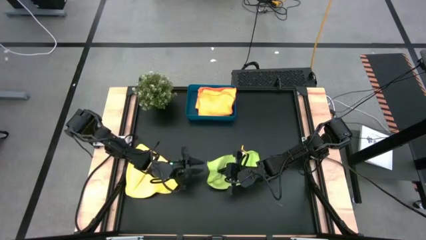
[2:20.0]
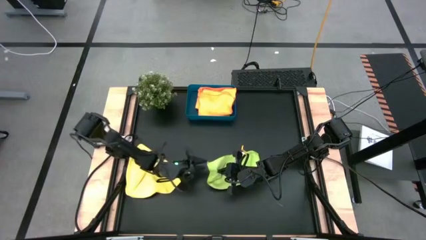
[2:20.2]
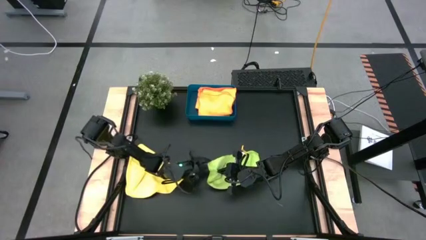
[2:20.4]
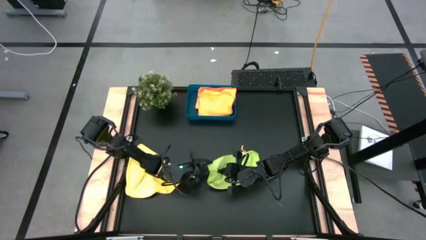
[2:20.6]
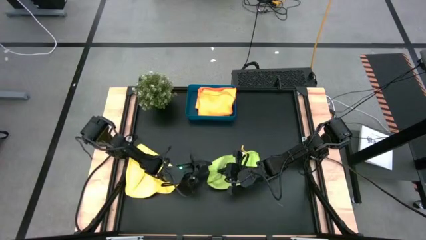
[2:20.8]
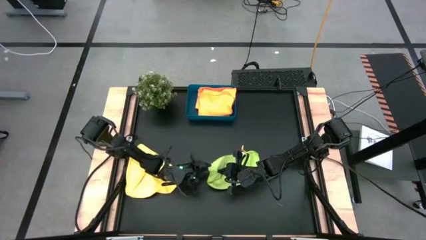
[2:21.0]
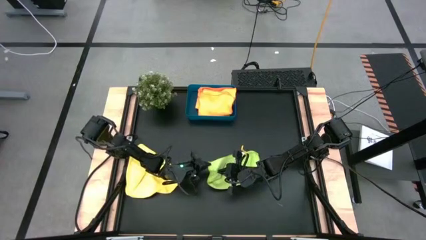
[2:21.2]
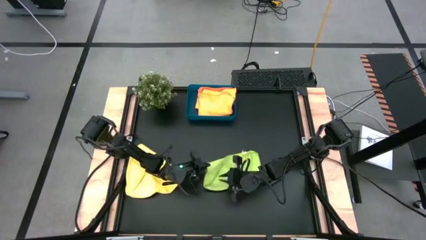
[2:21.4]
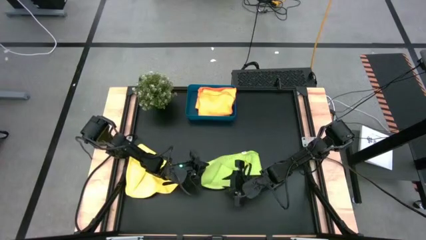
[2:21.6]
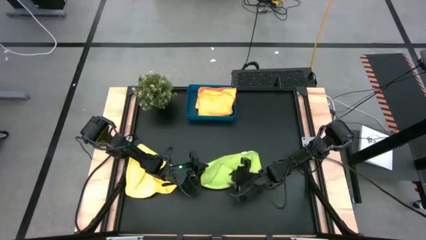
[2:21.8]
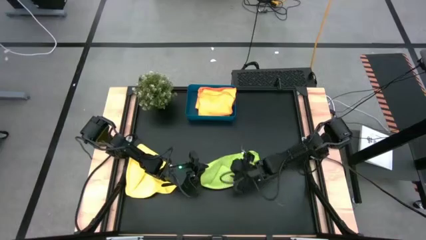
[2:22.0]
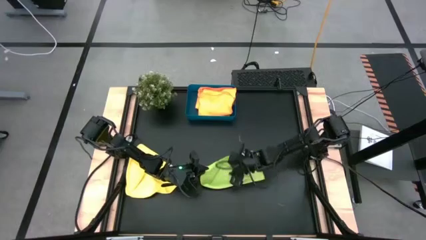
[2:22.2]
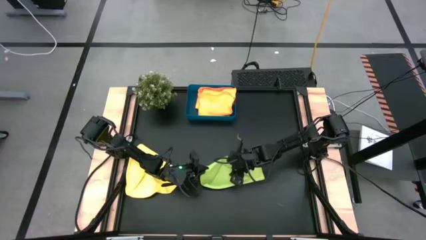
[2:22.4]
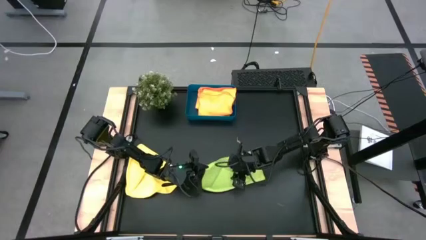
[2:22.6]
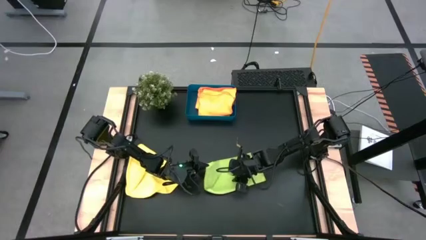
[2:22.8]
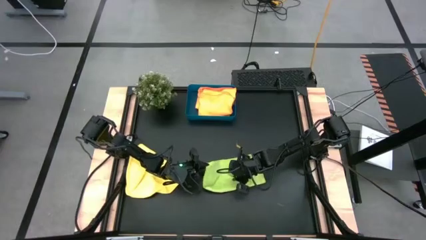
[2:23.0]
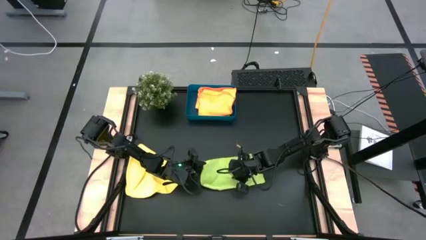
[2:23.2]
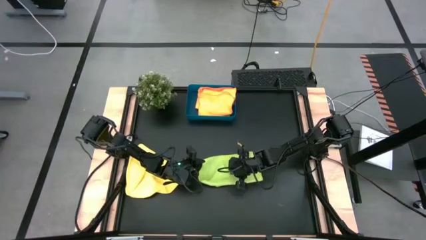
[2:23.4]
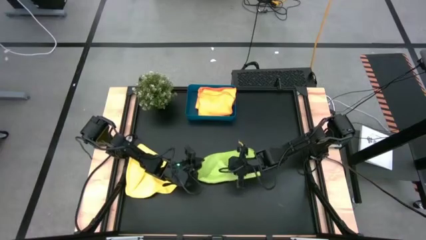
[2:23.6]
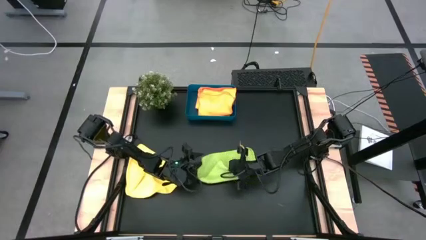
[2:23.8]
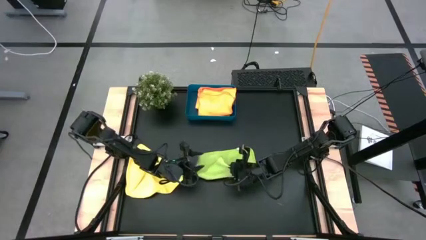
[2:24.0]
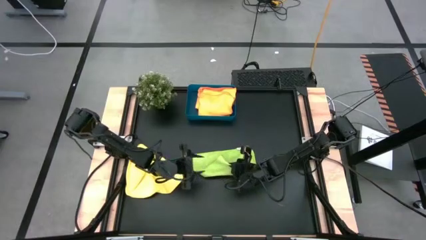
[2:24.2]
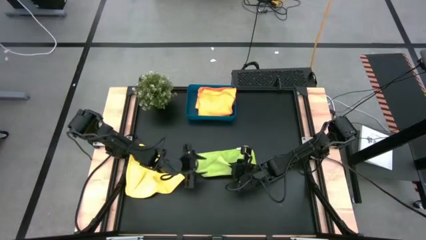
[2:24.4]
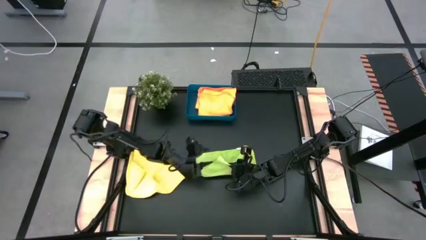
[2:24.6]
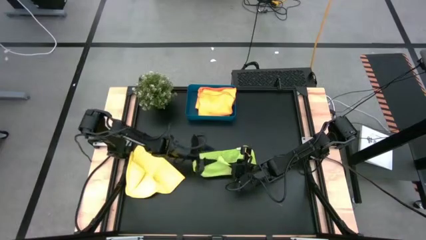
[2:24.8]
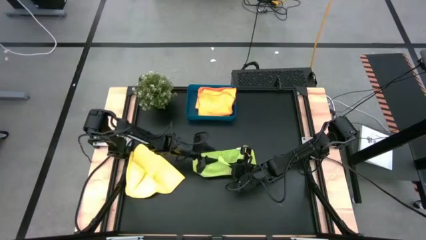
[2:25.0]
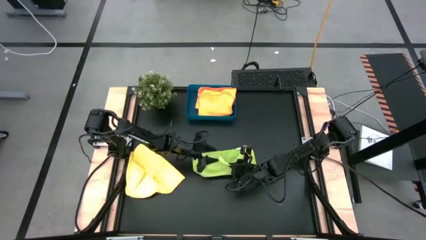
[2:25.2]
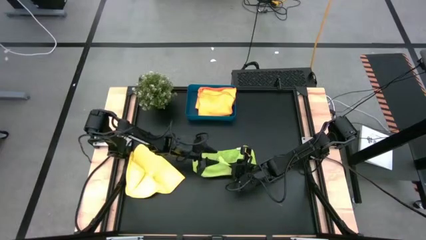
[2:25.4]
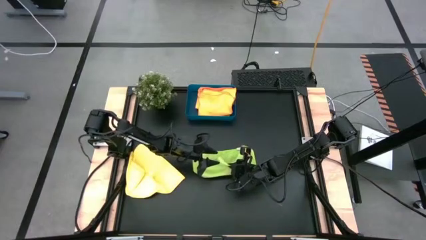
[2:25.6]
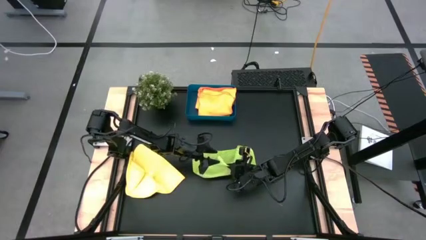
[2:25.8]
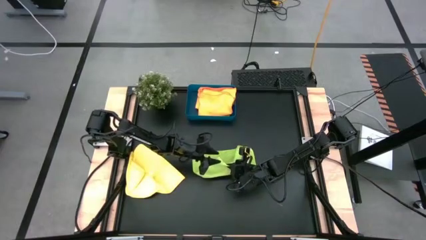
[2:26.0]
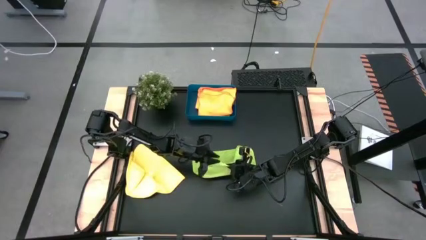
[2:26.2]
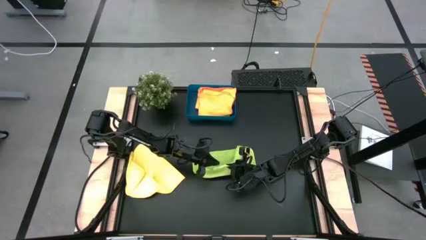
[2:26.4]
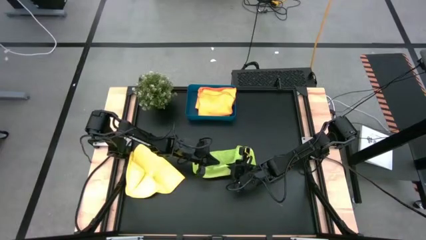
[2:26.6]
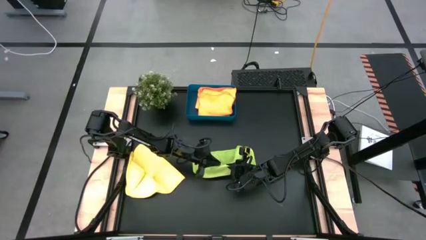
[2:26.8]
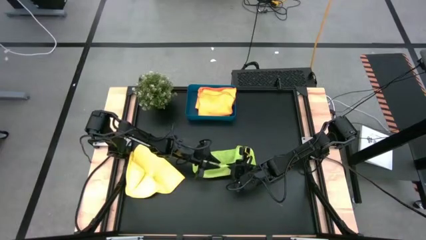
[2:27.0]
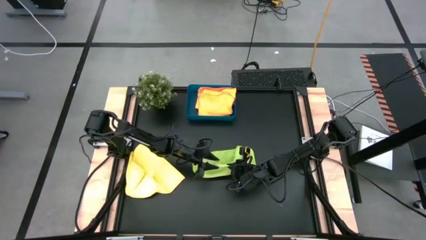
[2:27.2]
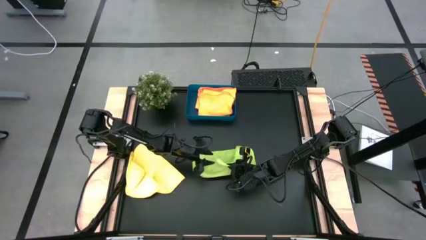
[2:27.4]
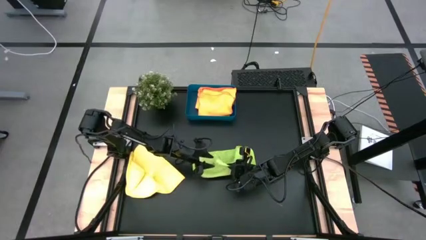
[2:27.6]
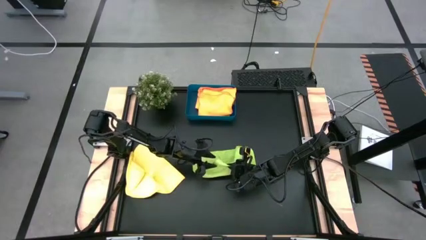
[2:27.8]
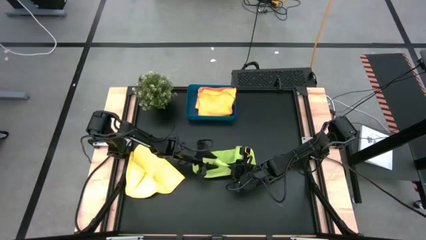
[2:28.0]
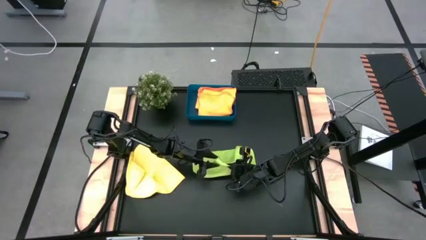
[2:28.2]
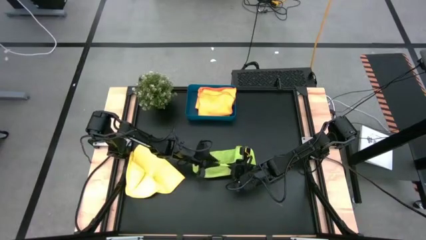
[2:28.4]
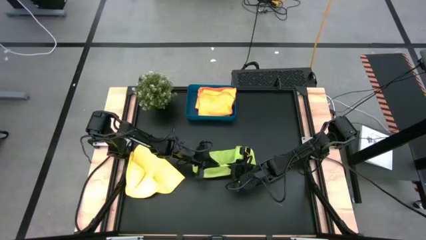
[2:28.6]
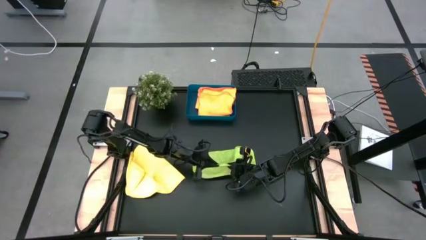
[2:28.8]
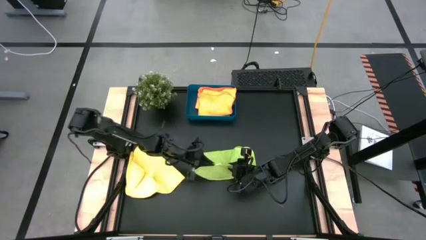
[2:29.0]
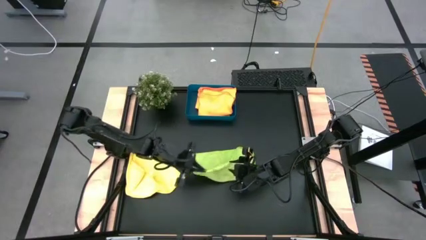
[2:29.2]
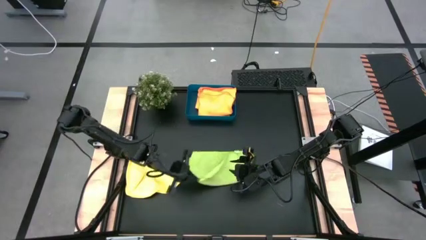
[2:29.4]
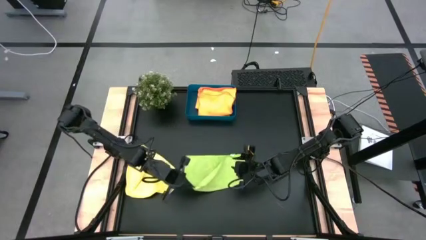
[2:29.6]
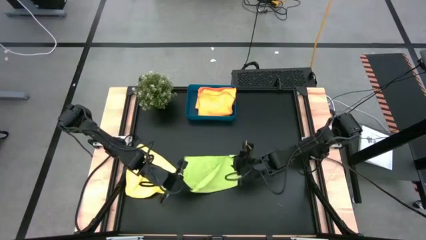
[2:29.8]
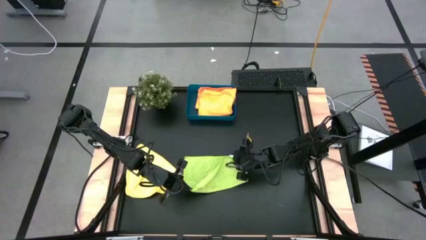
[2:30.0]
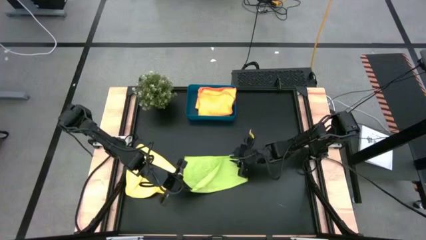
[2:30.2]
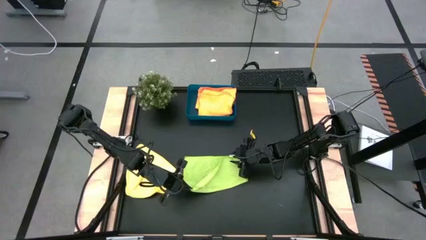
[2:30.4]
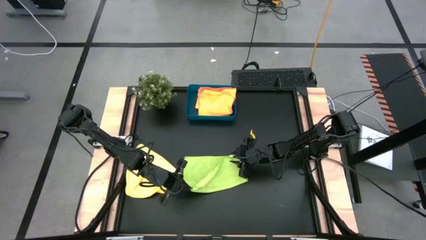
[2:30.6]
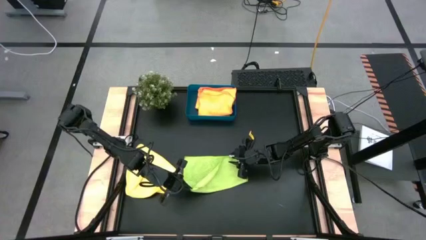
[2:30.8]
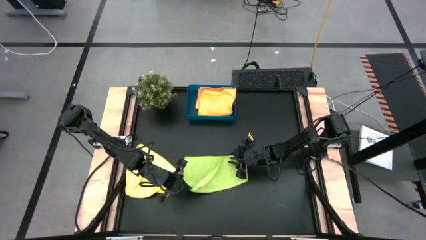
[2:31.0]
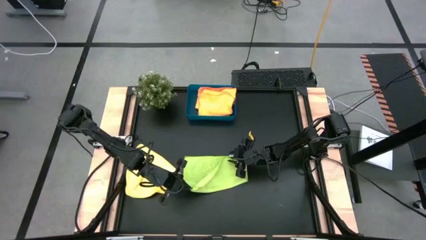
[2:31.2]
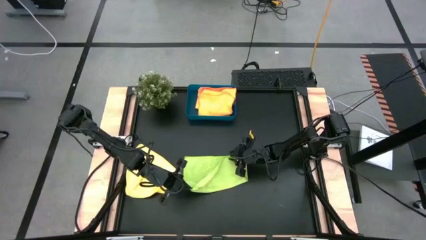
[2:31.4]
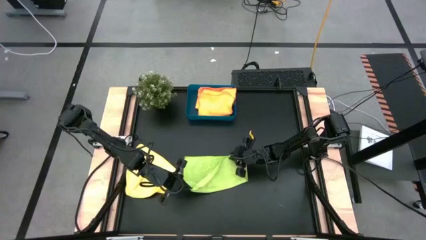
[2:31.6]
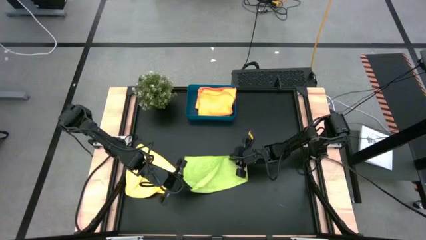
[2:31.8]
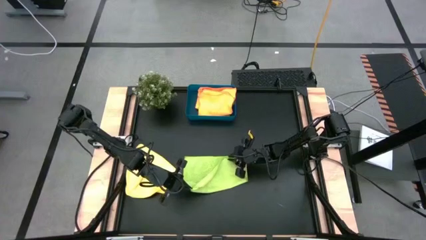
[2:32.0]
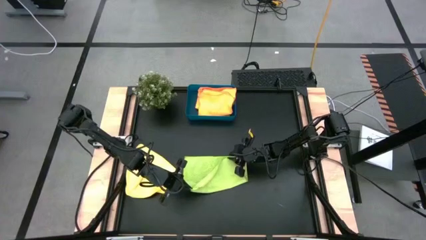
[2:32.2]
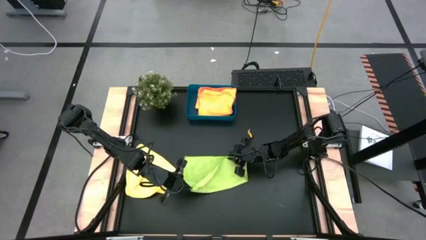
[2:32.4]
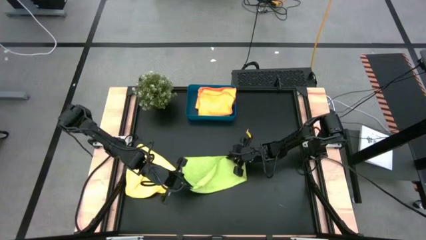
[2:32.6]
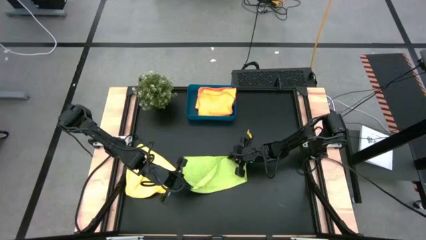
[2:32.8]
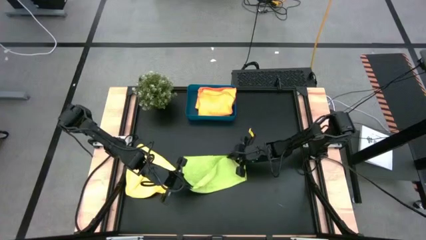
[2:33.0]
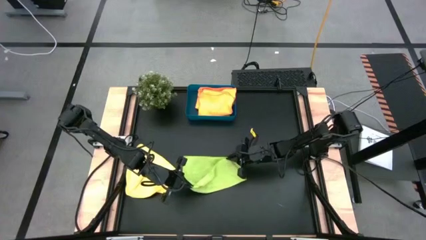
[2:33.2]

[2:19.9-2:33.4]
Task: Fold microfiber towels
Fold the green microfiber towel

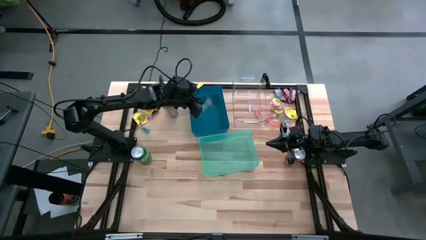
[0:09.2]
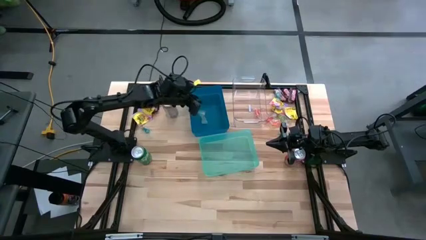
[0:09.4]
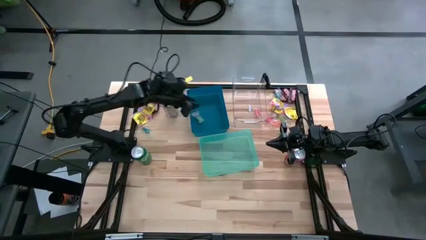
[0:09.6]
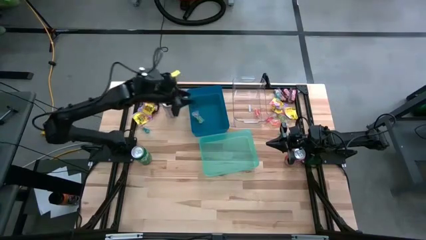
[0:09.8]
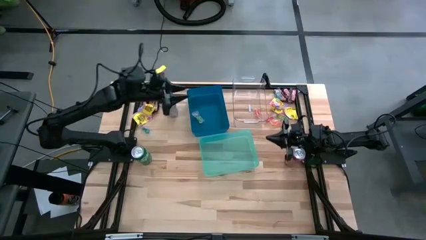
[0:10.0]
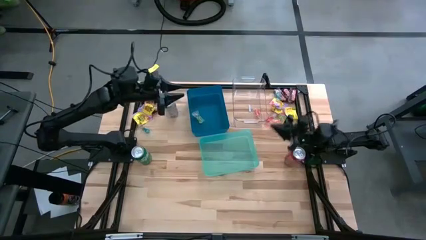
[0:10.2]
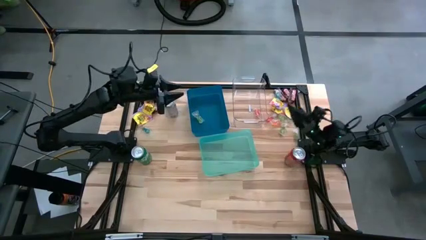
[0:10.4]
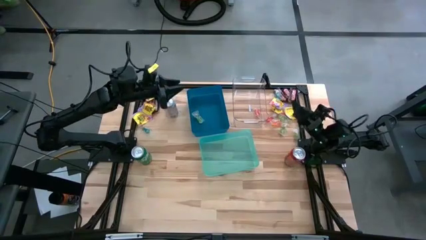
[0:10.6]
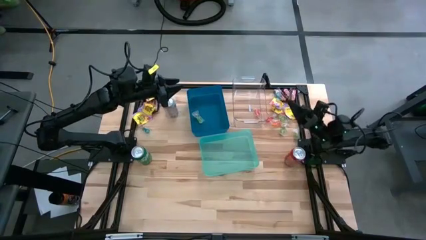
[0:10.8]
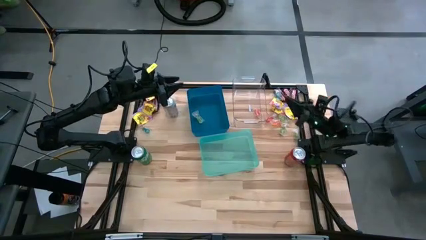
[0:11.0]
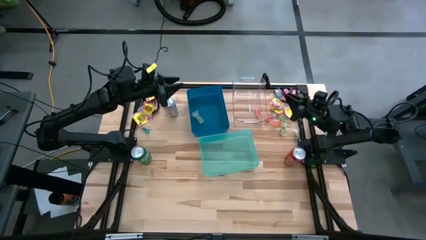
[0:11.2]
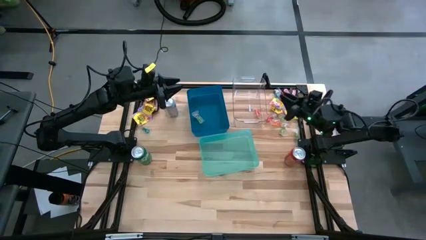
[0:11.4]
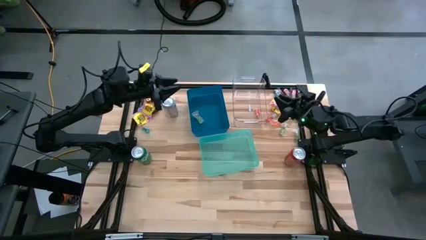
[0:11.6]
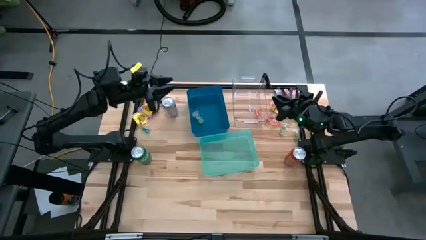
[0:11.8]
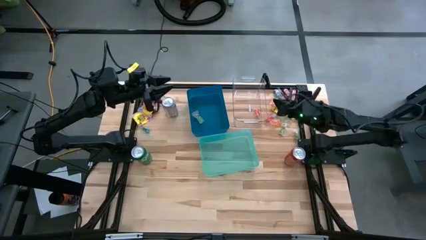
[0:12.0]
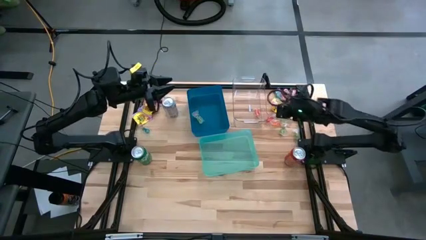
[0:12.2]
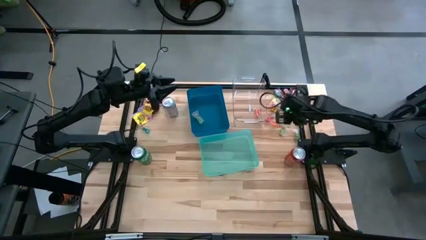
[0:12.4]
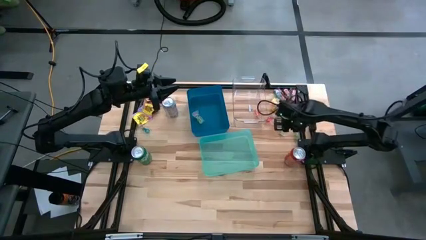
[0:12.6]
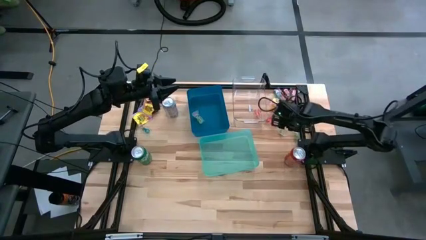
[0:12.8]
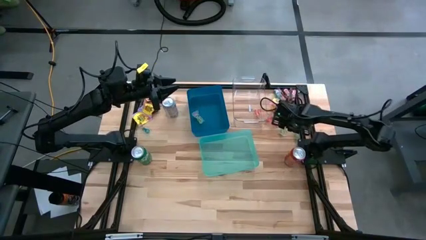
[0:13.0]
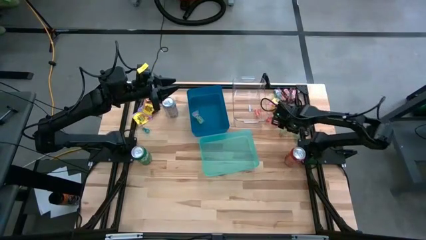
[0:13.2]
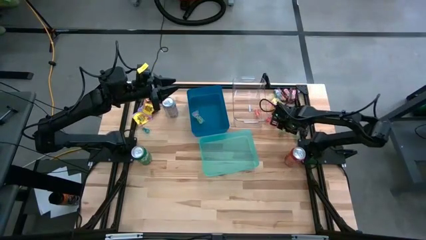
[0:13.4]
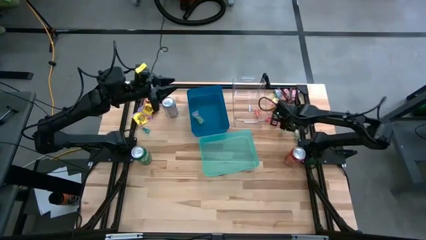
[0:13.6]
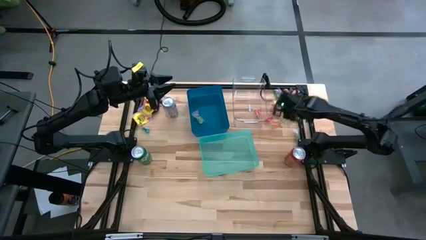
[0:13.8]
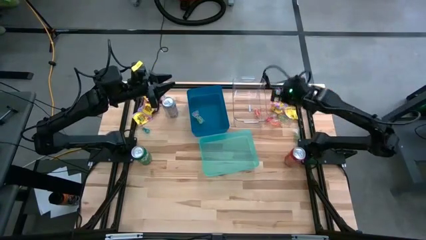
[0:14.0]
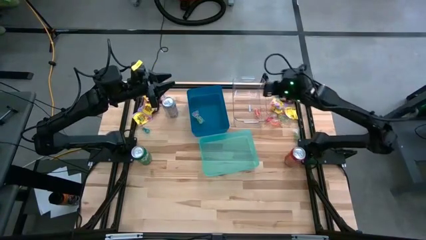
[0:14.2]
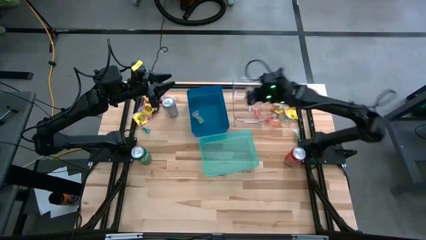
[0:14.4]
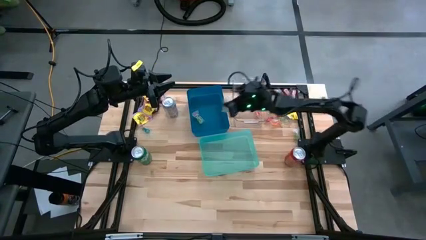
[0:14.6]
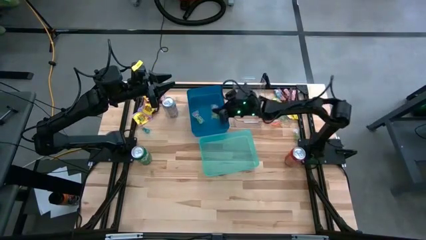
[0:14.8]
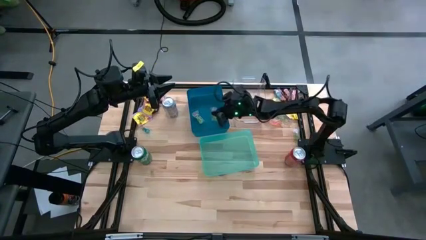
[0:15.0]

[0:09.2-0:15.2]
Task: Sort candy
Put the green candy into the blue bin
